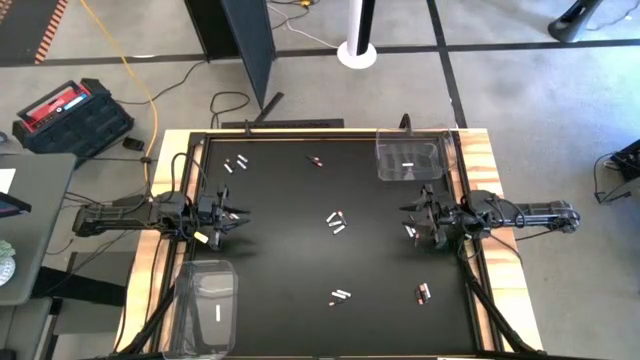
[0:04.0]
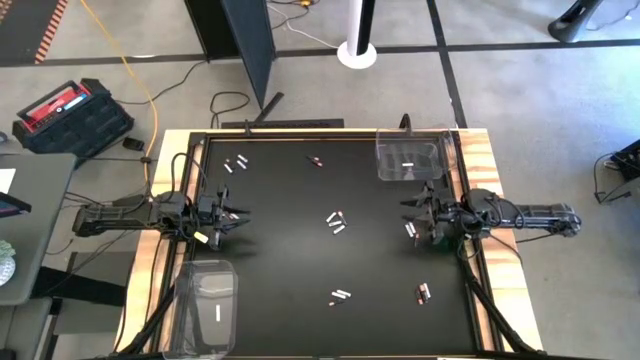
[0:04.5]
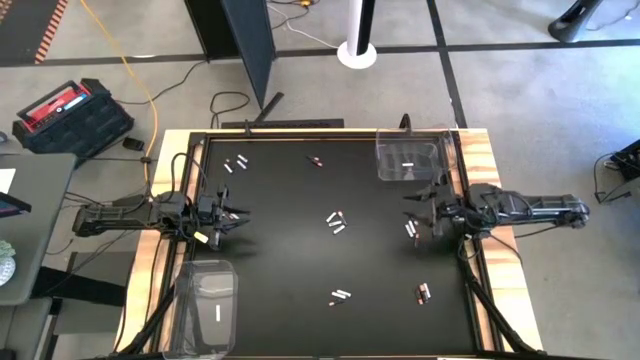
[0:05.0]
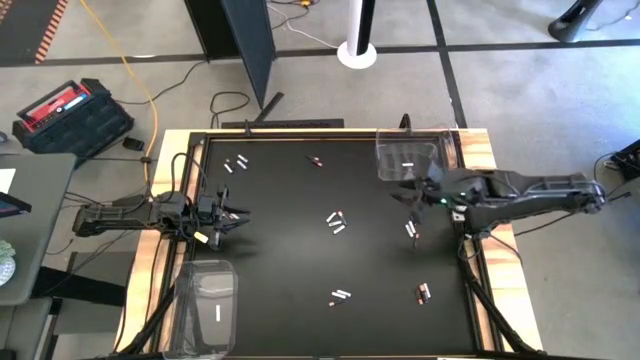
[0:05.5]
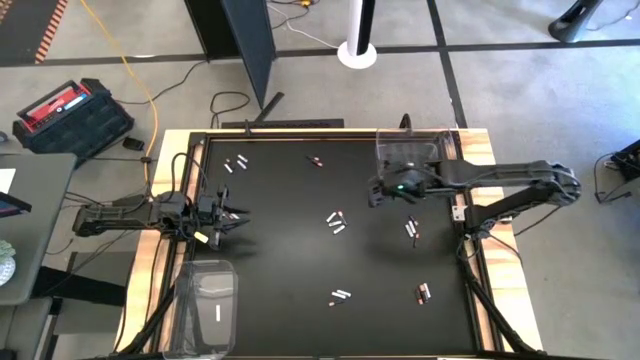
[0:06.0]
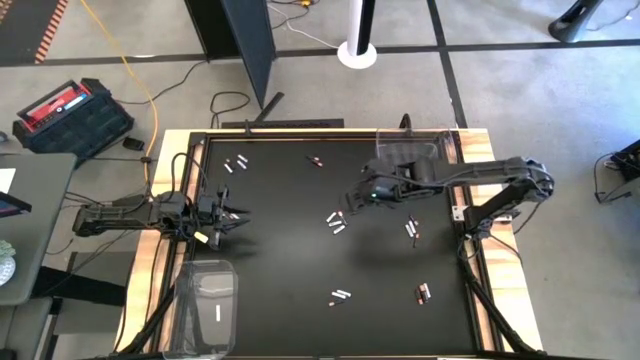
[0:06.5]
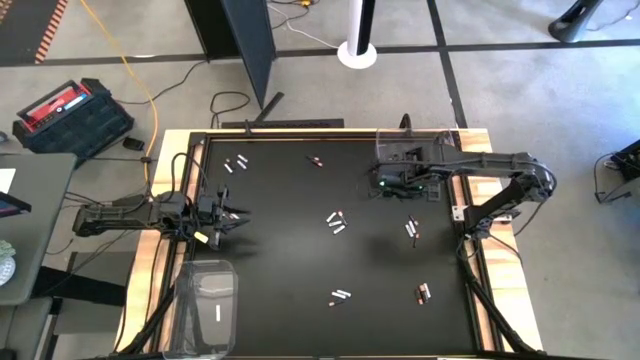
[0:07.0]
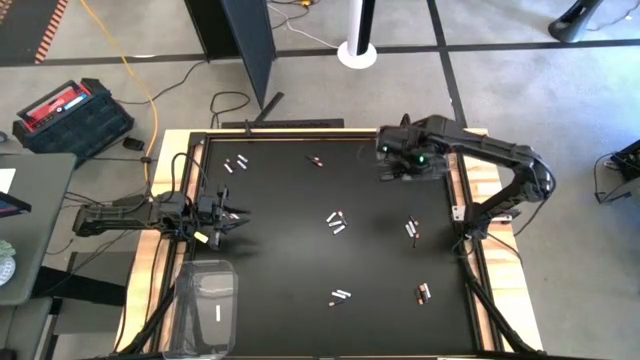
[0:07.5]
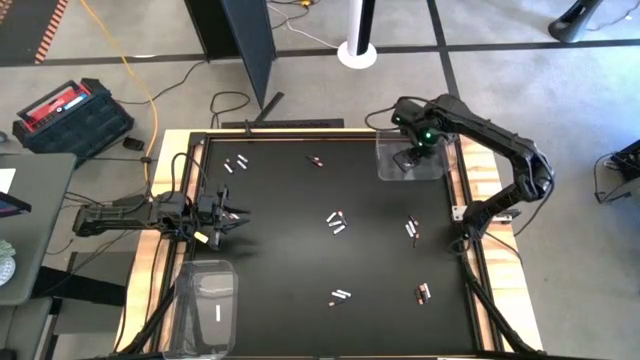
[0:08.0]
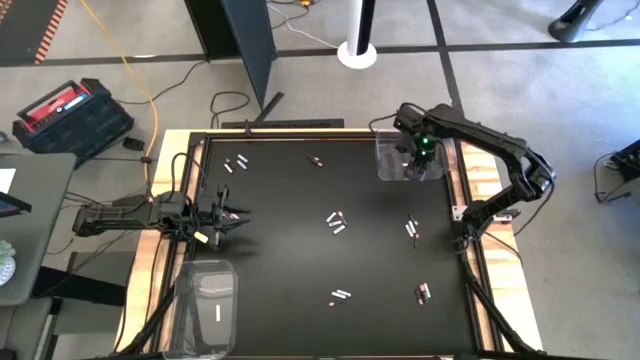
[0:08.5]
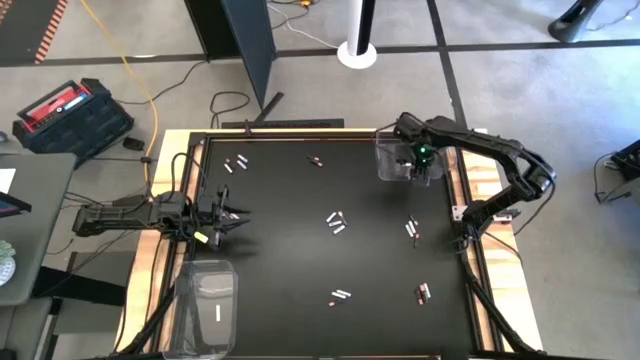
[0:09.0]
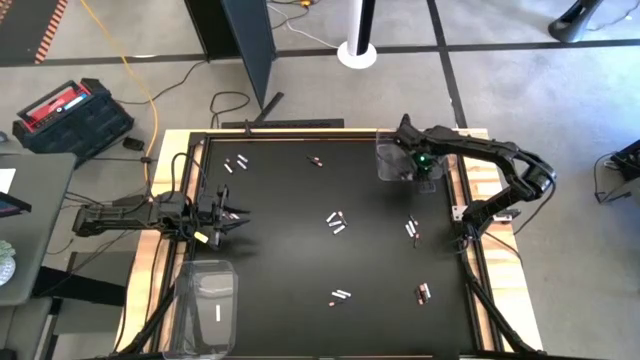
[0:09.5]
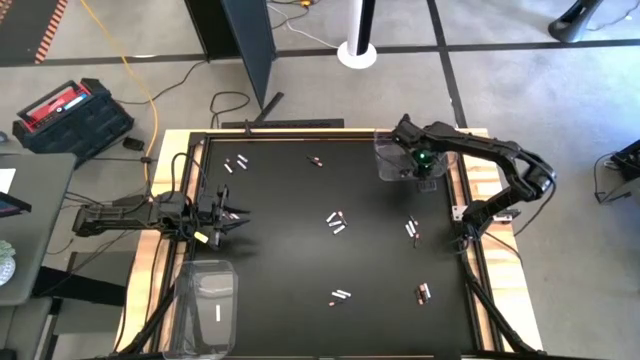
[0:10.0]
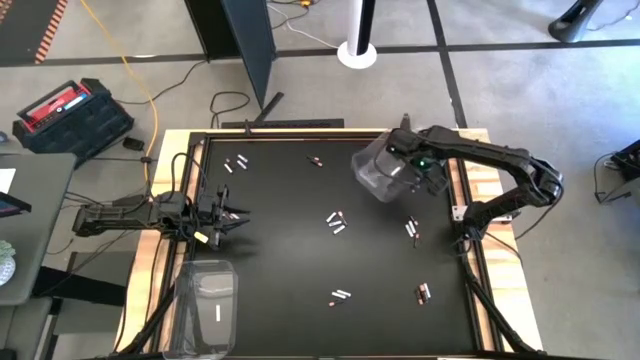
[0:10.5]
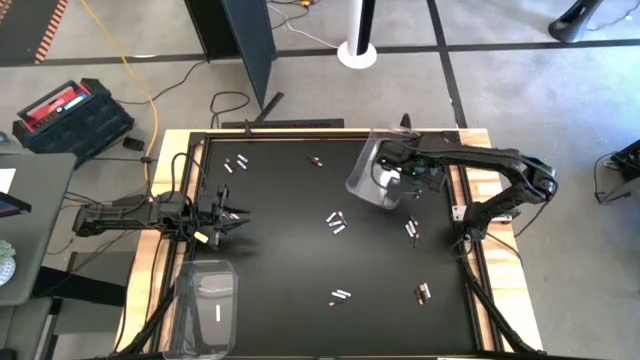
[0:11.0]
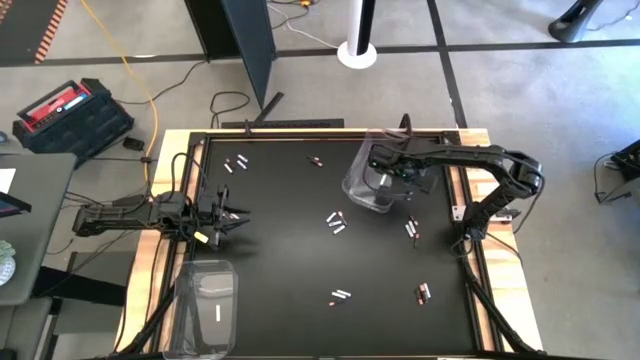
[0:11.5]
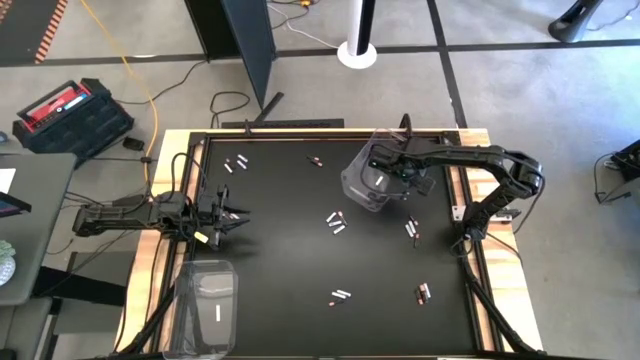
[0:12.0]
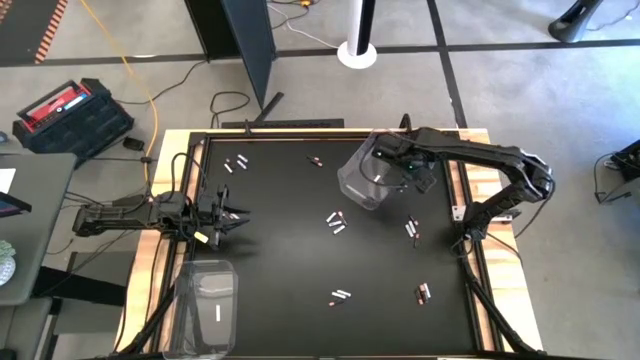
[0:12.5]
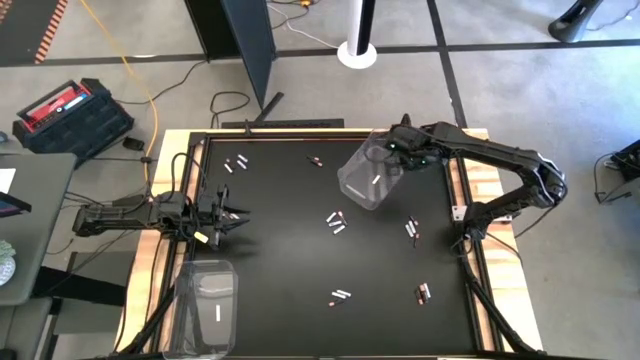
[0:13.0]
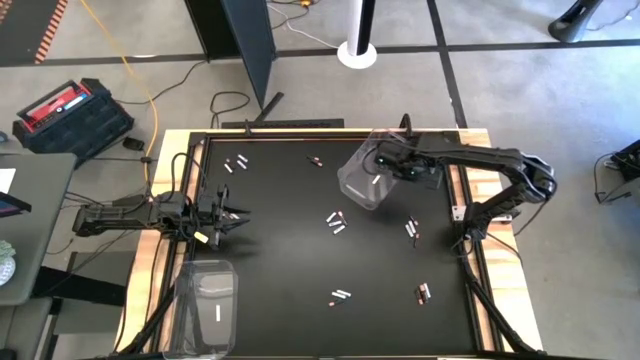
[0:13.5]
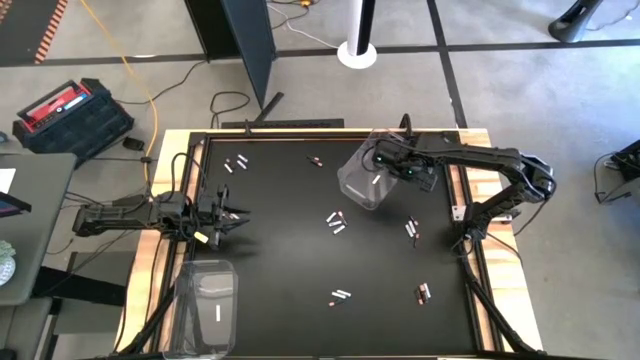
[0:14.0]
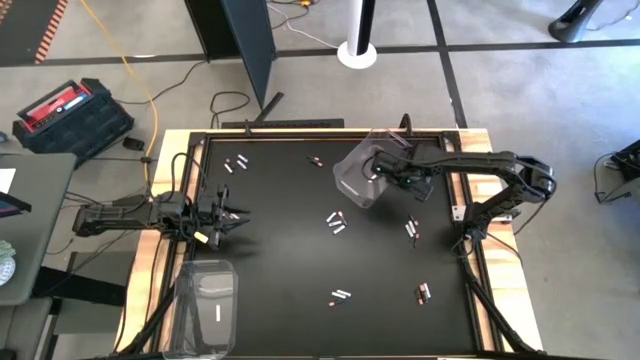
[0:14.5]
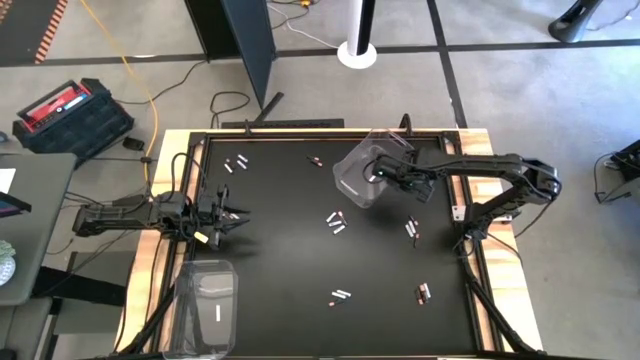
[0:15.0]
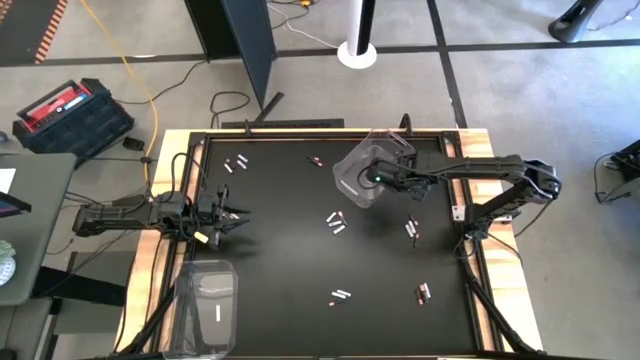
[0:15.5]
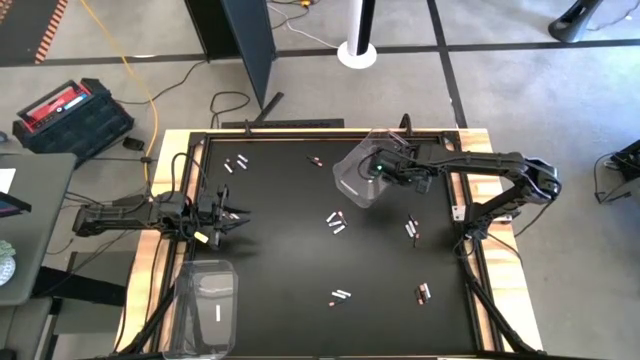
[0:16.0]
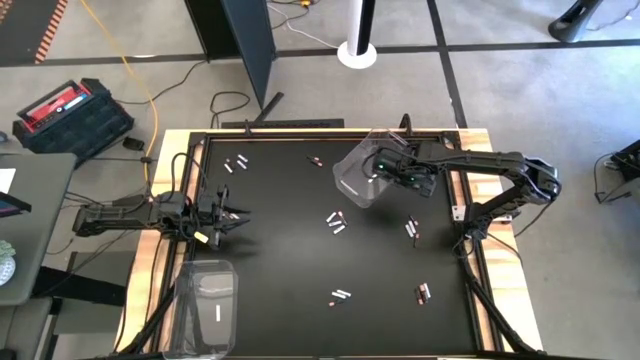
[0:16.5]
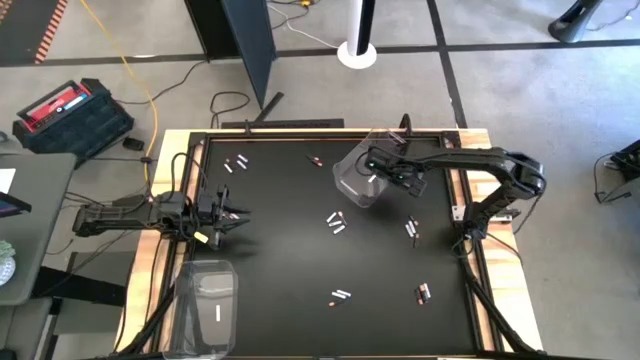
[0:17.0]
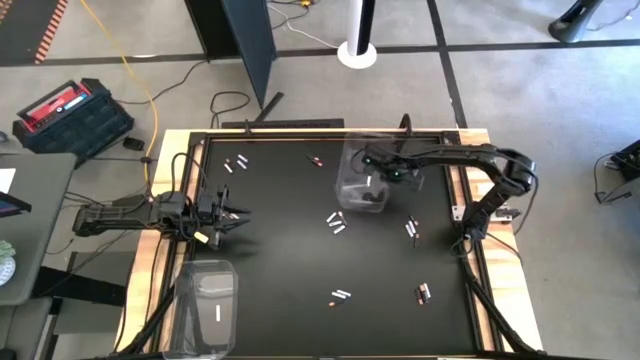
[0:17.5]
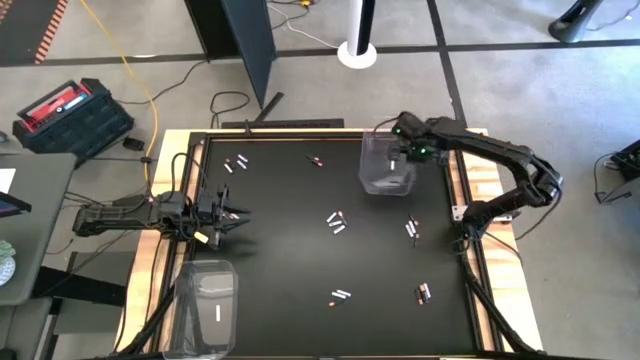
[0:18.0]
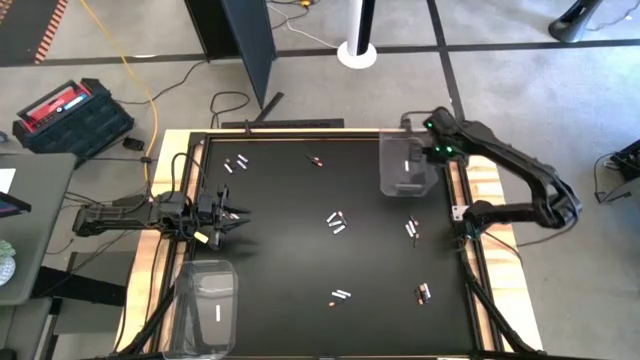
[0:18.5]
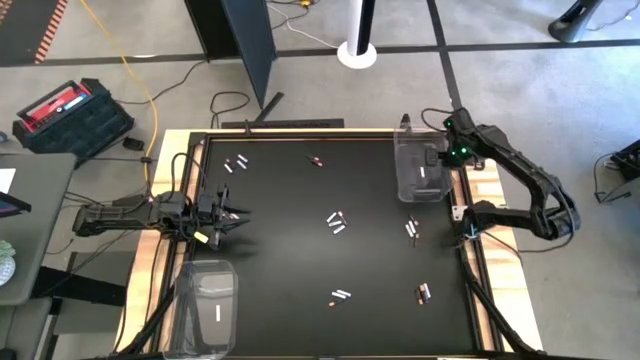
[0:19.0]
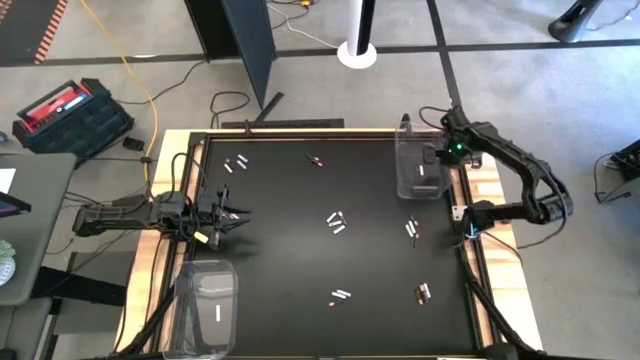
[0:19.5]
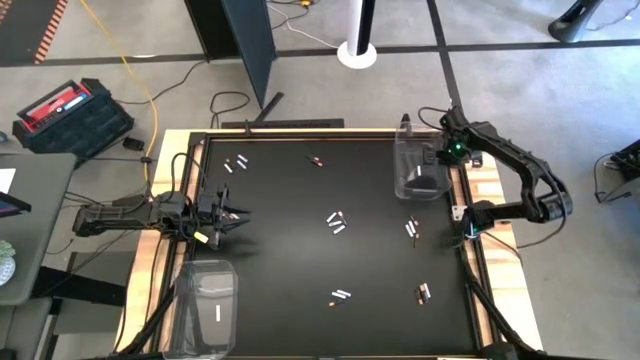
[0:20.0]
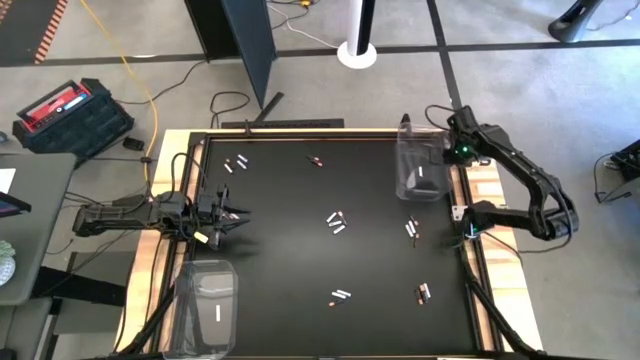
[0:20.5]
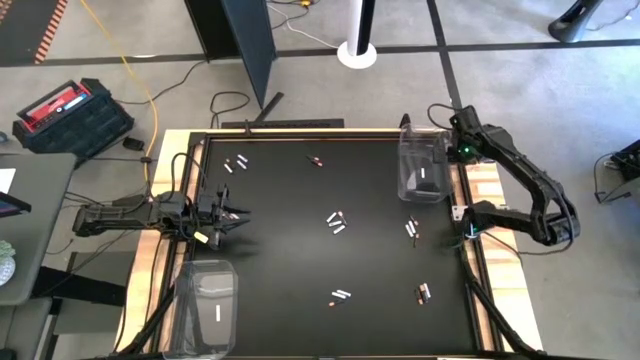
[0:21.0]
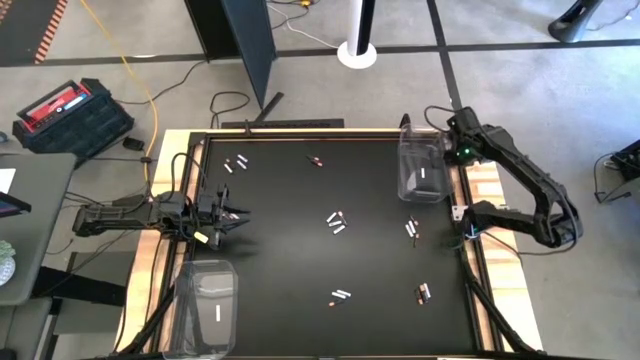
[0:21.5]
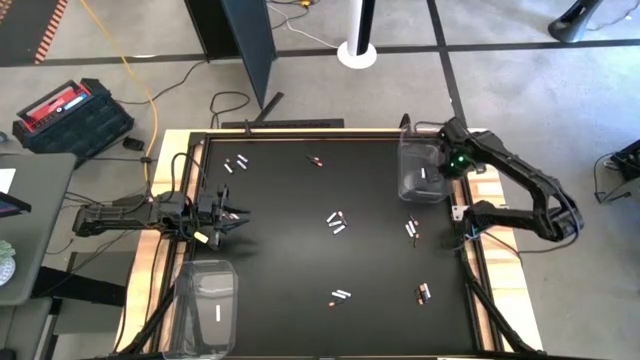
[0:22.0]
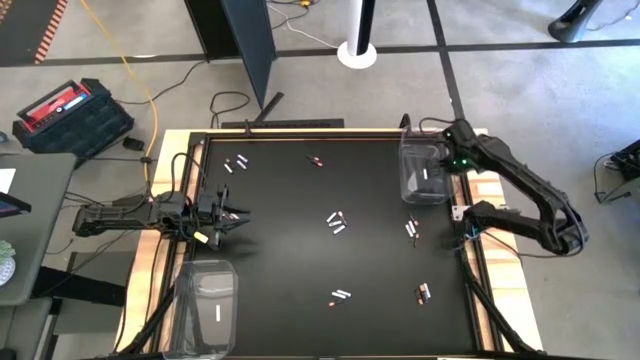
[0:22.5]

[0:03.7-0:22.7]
Task: Sort batteries
Adjust the right transparent bin

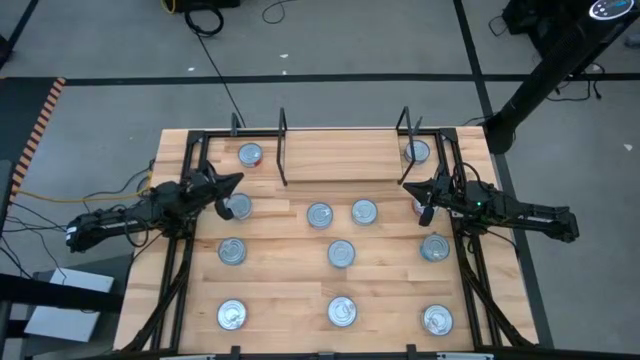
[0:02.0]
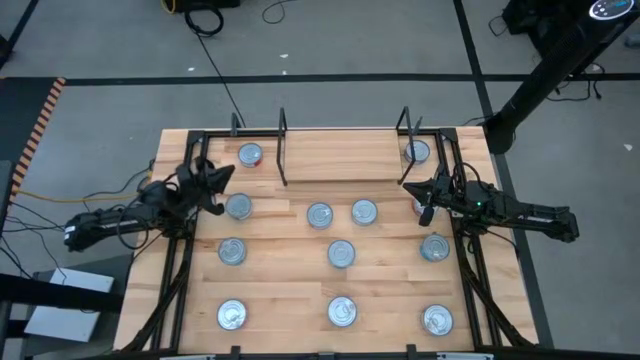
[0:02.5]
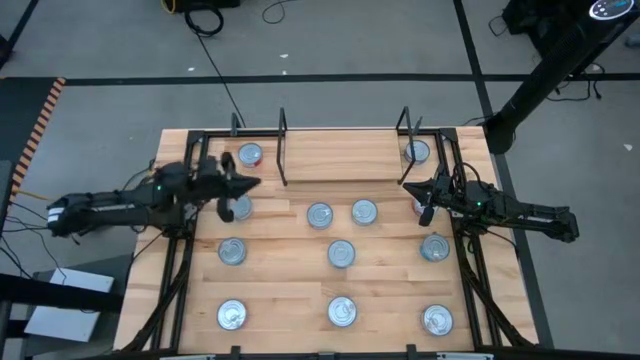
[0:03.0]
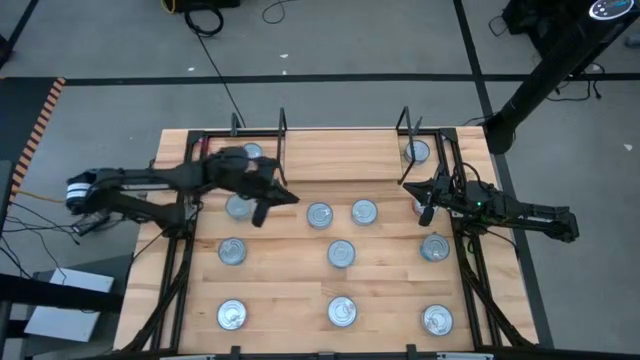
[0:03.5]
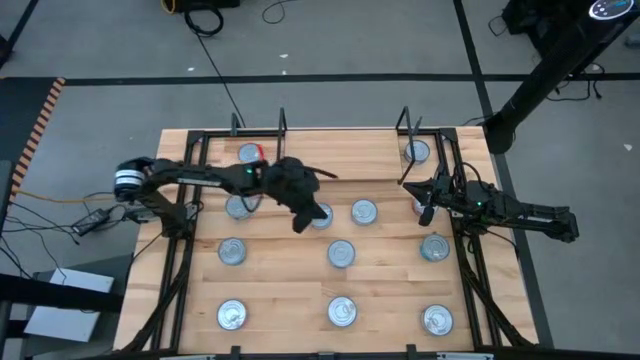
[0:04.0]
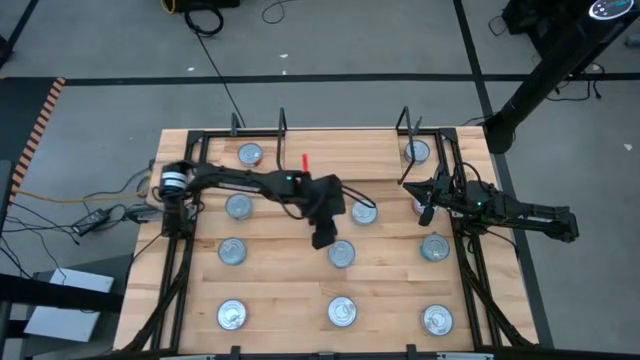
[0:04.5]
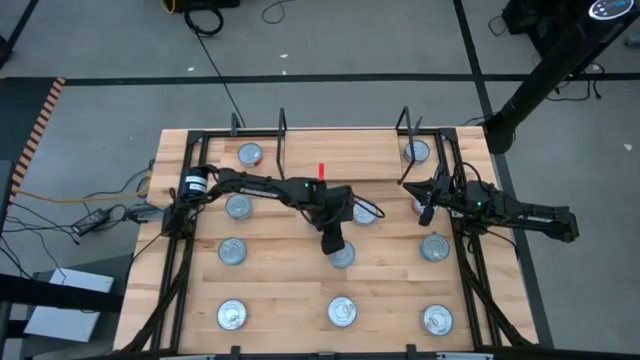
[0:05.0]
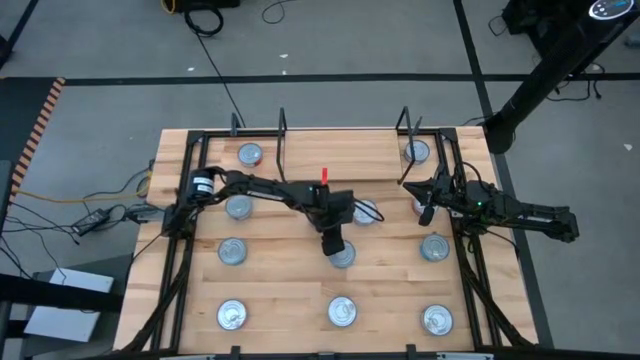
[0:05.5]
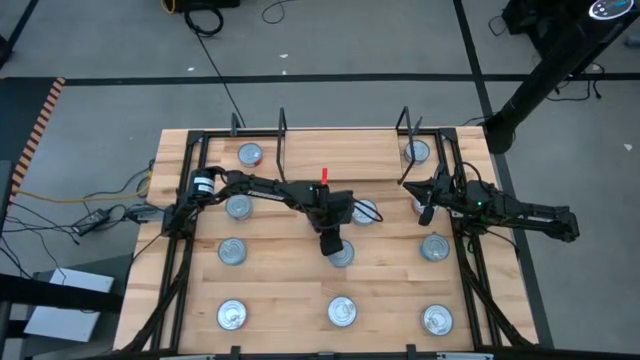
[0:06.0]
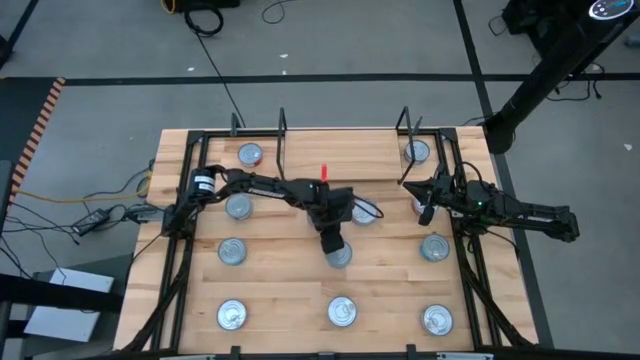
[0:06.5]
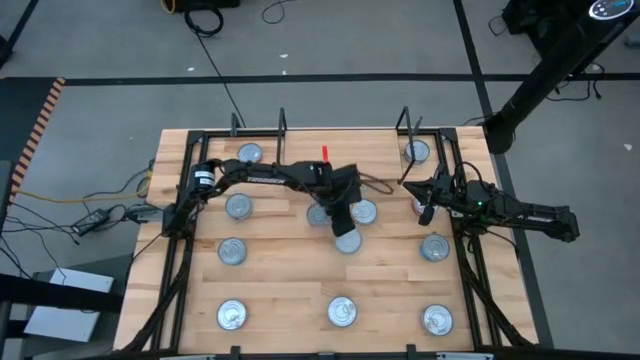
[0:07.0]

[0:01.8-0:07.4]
Task: Stack canned seafood by type on shelf
Put the light blue tuna can on the shelf
